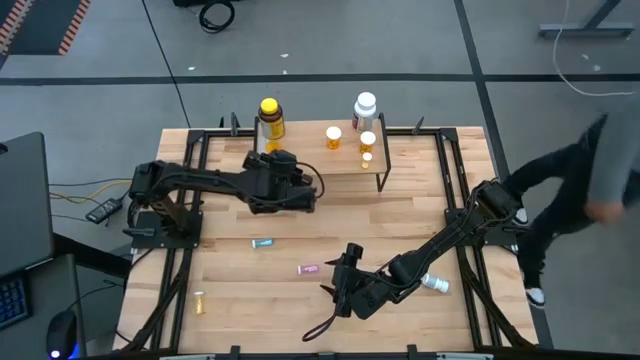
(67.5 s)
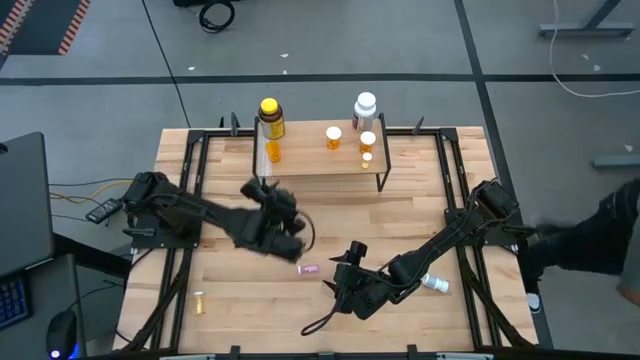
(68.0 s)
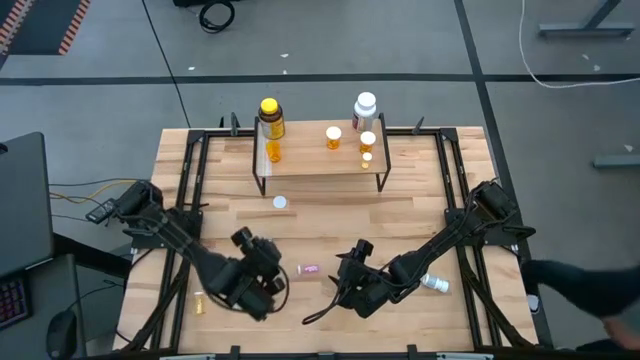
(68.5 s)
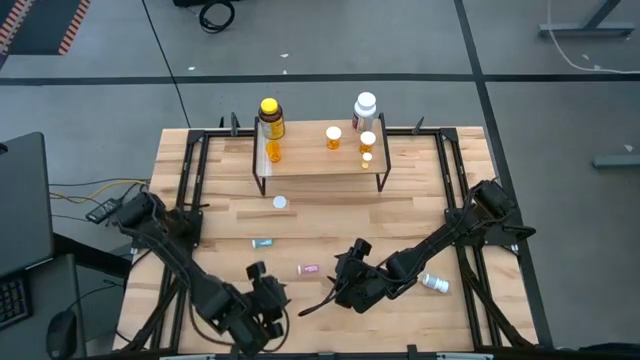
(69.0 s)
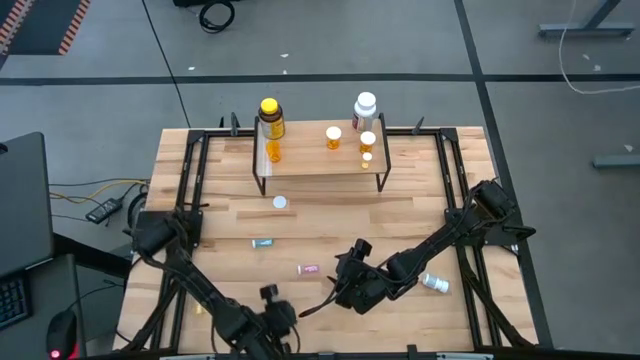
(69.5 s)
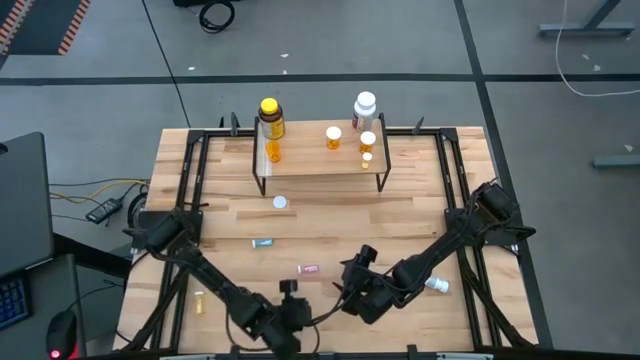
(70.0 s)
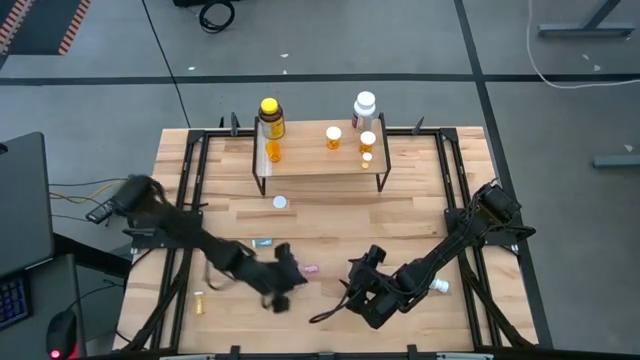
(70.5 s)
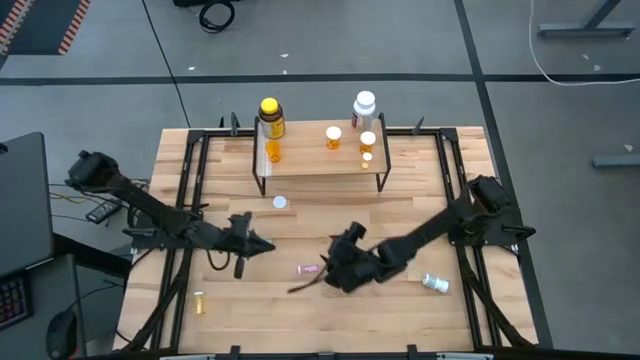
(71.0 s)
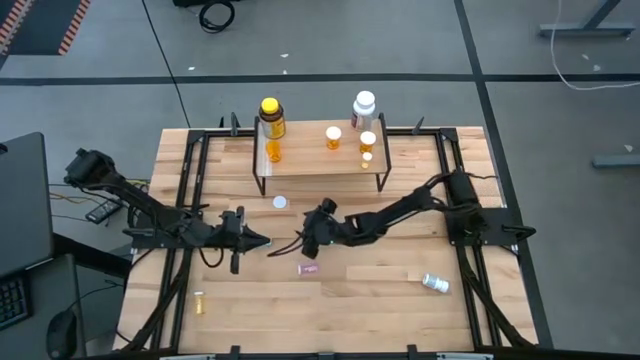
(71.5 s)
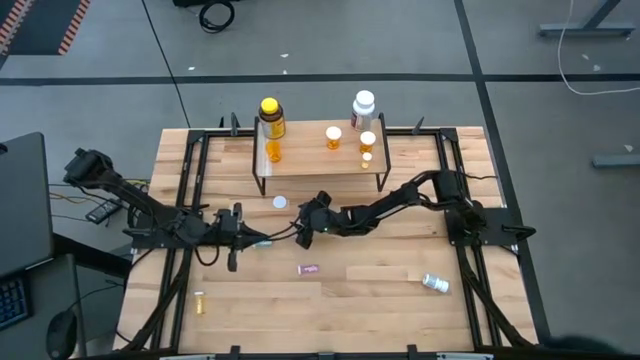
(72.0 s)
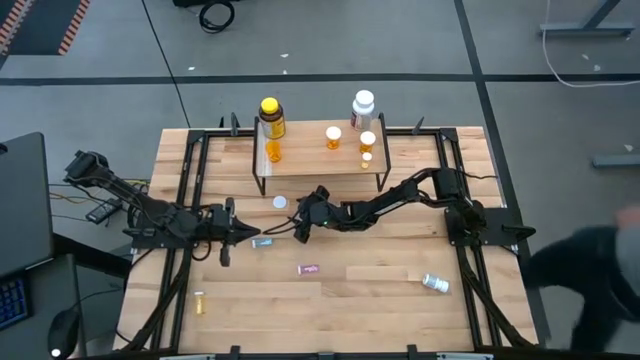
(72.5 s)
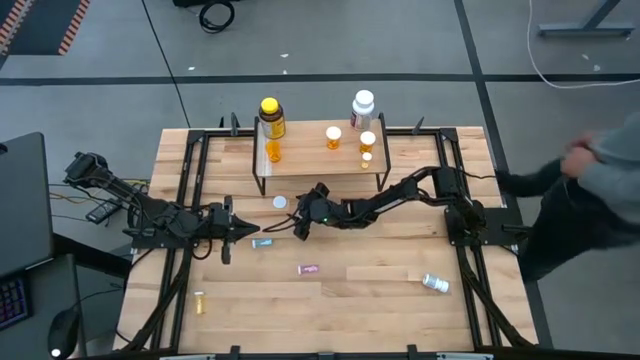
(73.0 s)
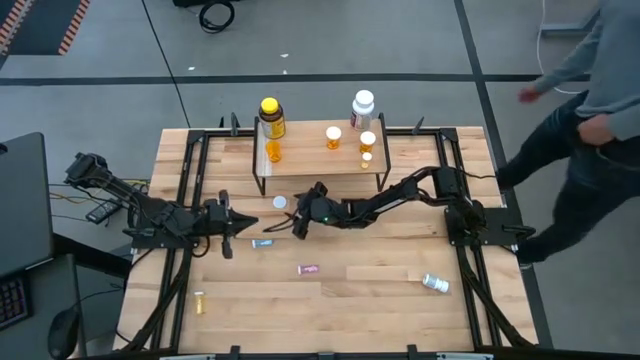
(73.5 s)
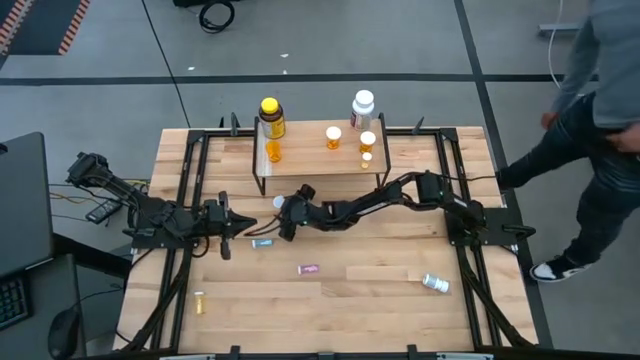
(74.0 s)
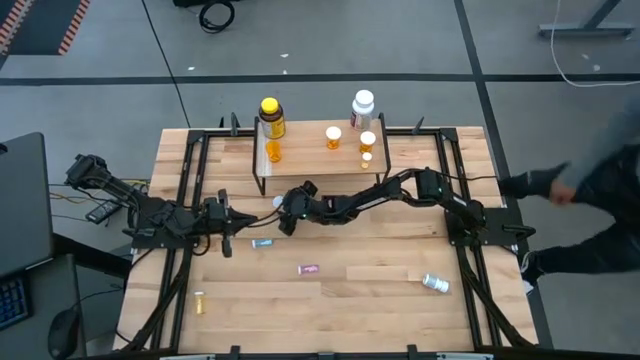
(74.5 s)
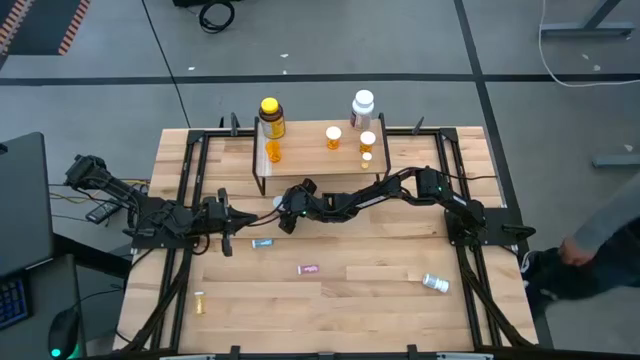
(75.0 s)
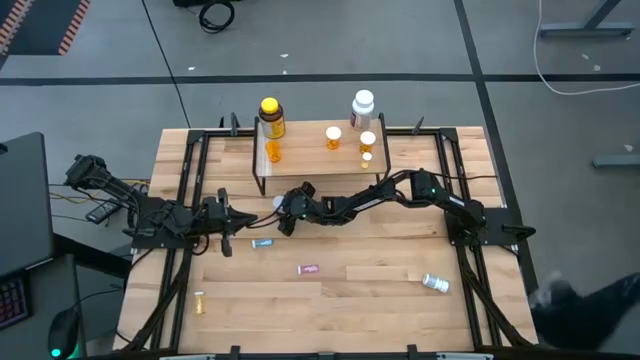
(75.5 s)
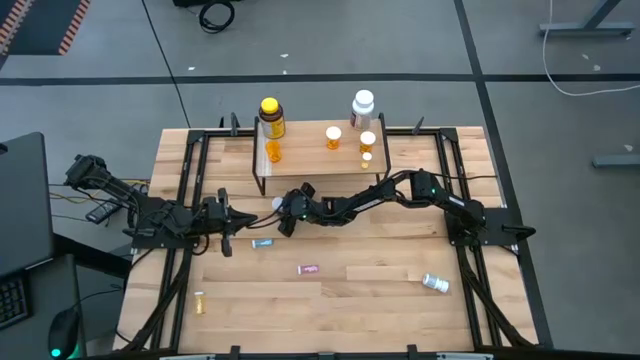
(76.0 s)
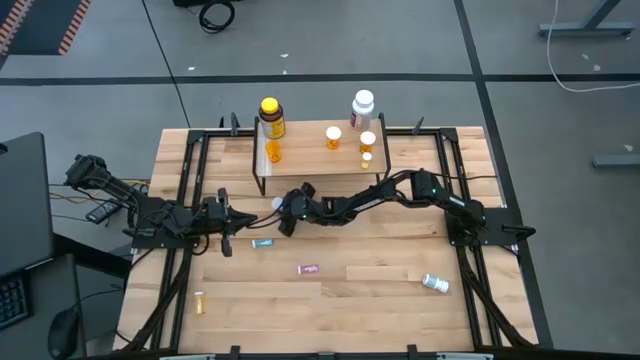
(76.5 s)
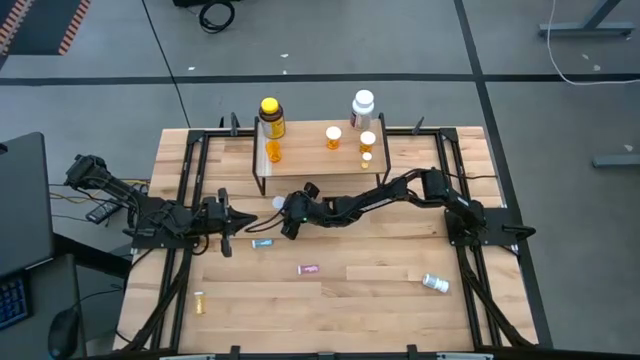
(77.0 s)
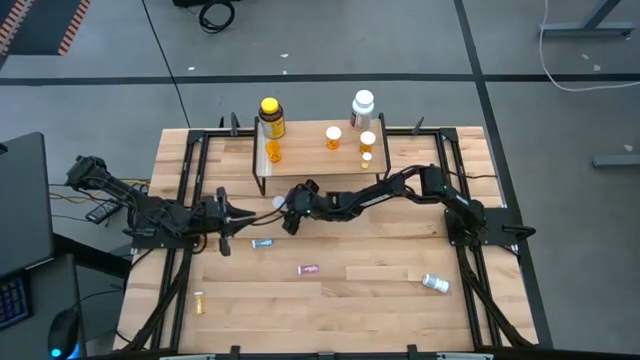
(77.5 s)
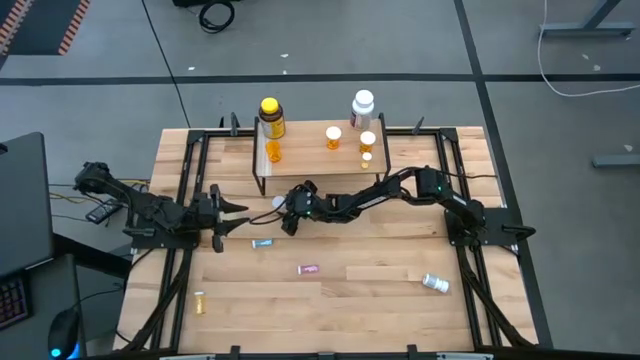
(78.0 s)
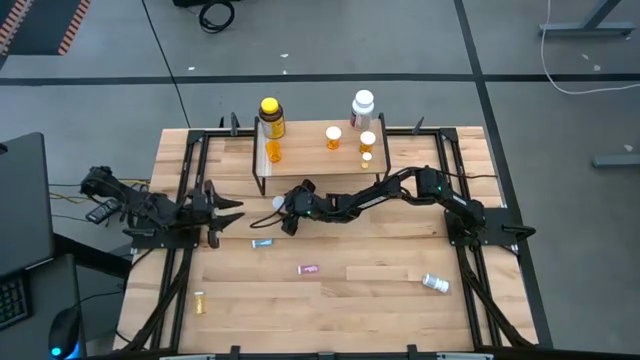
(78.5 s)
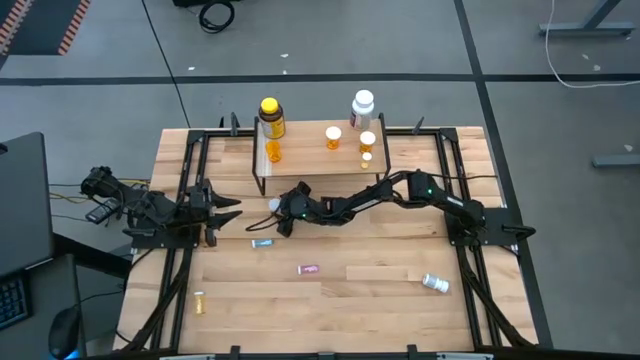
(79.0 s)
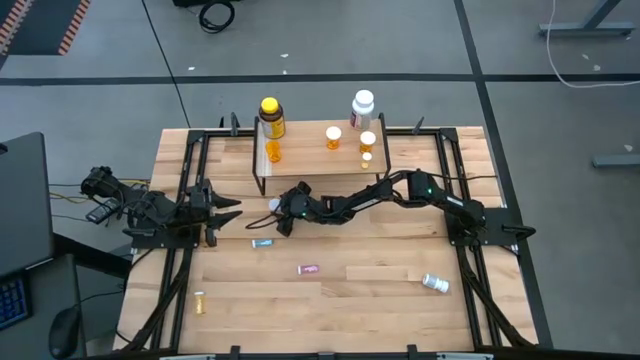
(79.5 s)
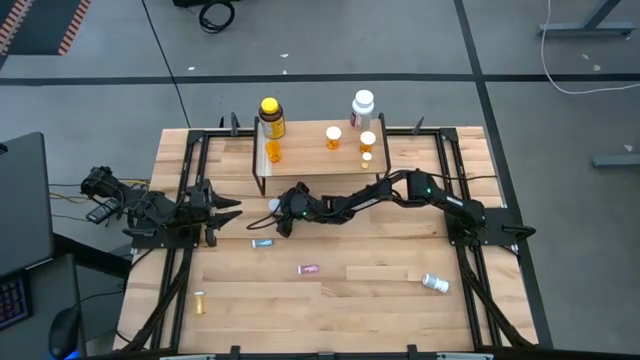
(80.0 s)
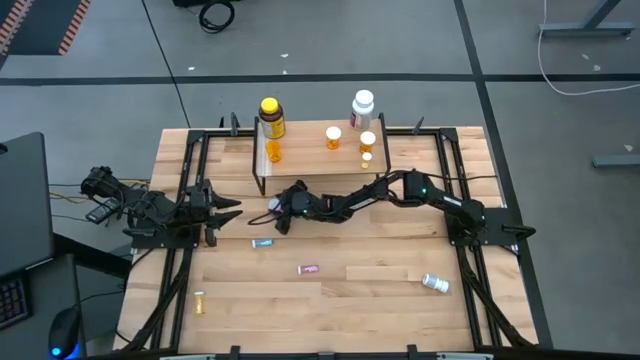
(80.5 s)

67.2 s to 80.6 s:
Task: Pick and place medicine bottles onto shelf by color
Put the lid into the large orange pill bottle on the shelf

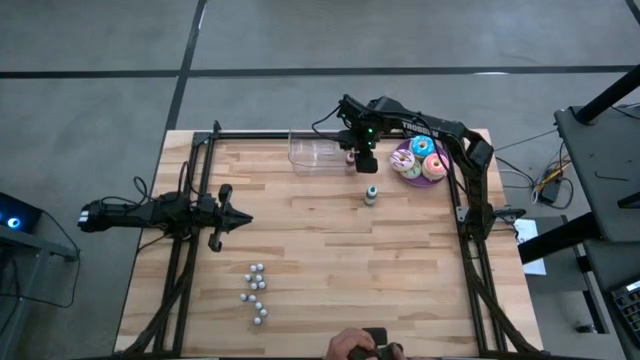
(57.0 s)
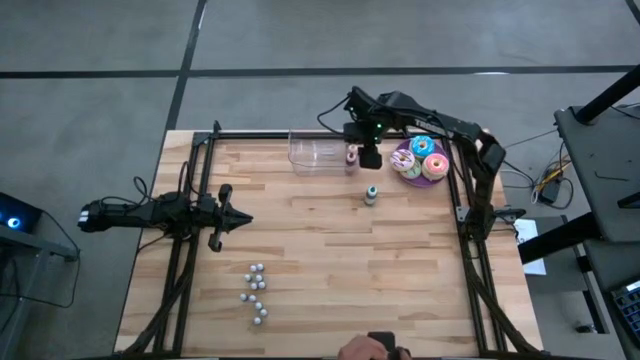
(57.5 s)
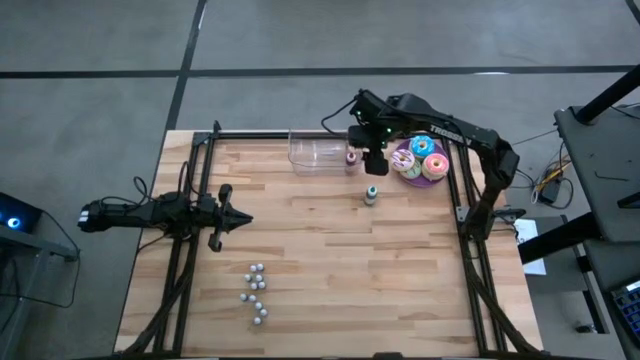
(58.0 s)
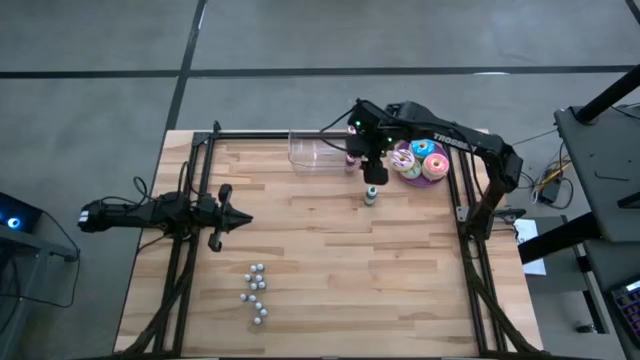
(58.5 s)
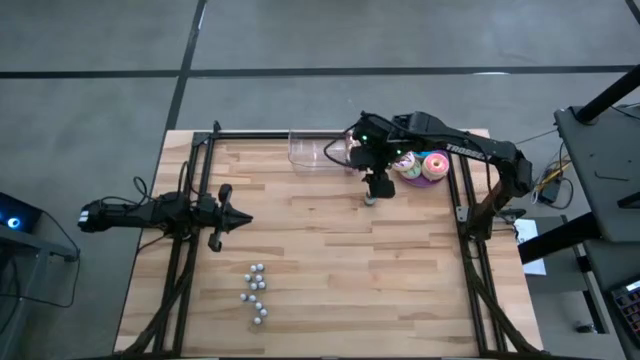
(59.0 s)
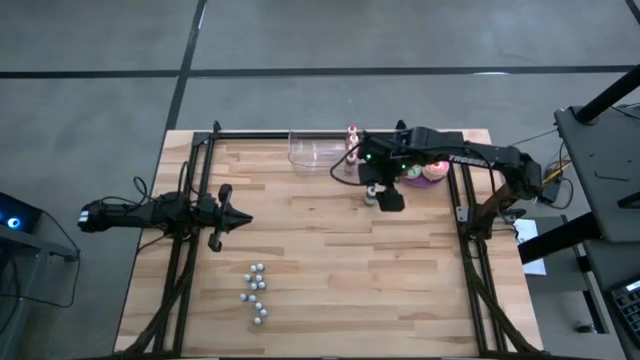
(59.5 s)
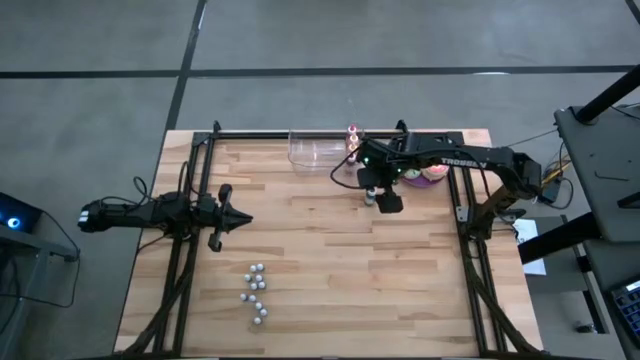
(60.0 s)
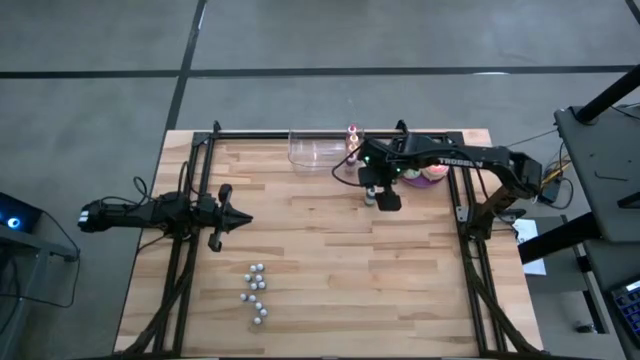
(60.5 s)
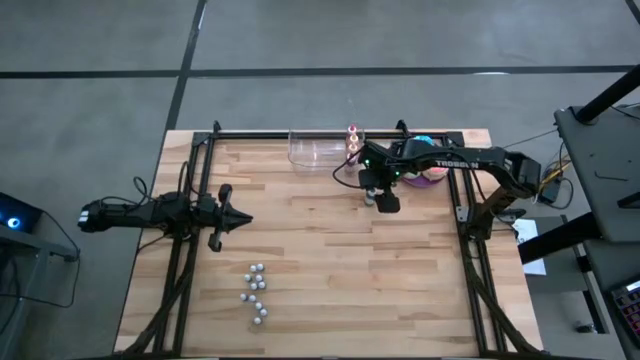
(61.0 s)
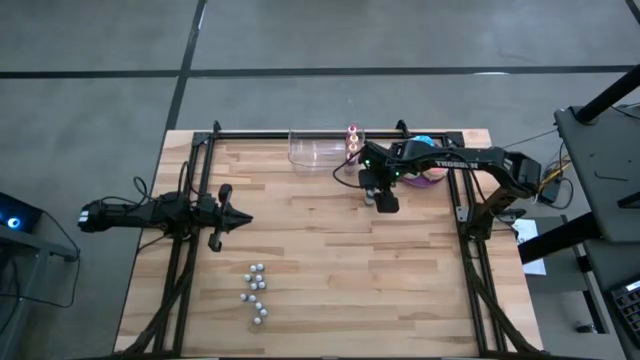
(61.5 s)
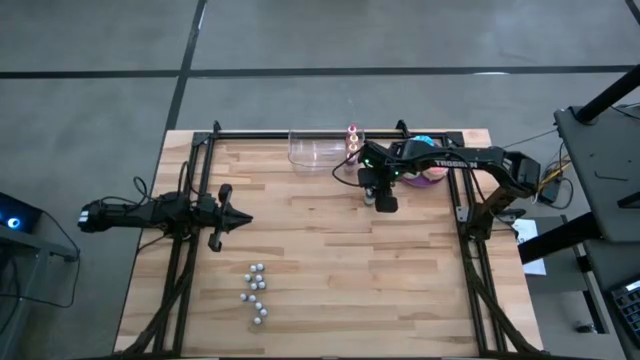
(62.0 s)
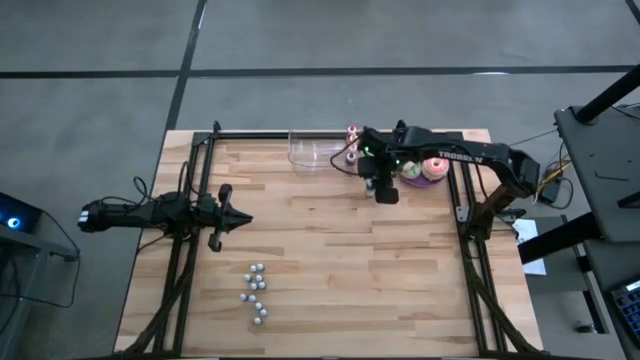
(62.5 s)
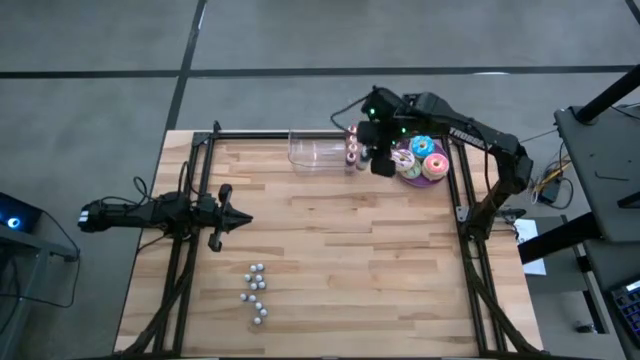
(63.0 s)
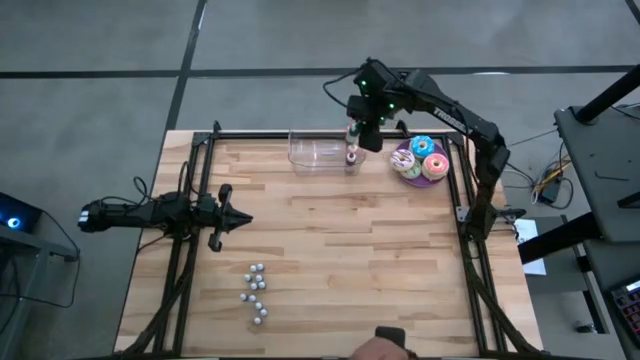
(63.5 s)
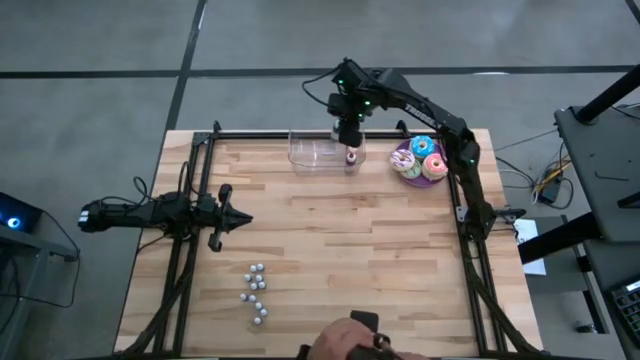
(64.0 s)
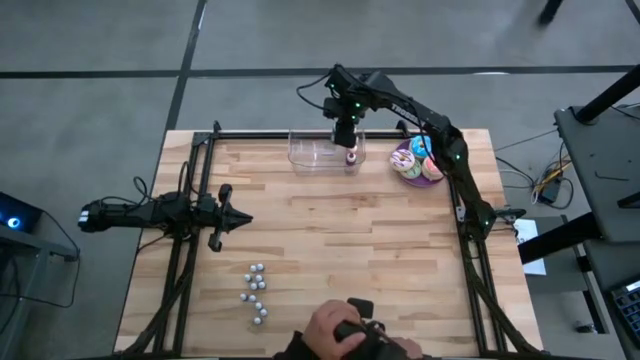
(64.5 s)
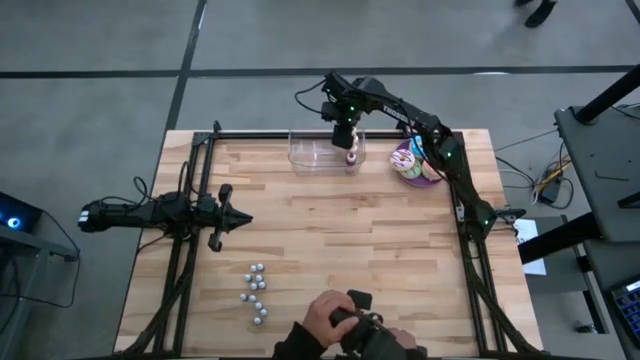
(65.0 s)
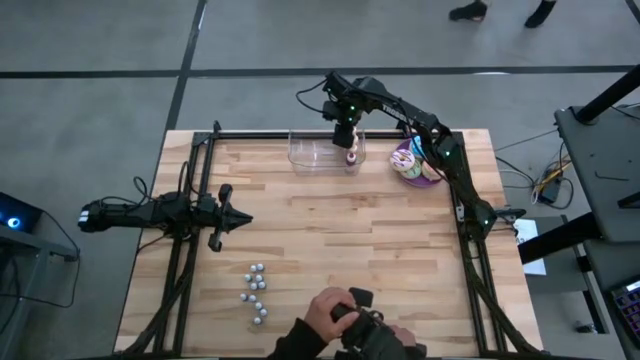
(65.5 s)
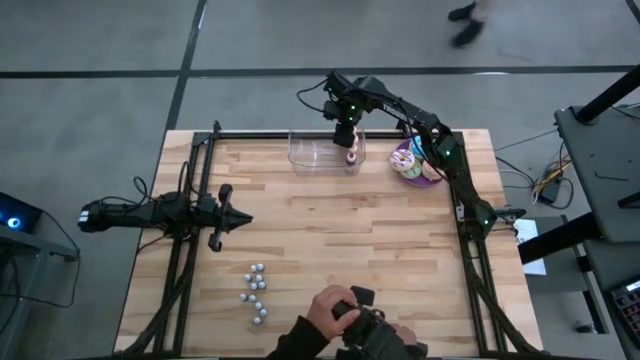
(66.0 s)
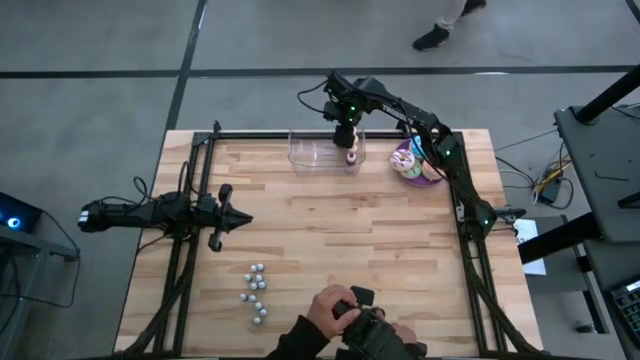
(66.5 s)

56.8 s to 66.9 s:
Task: Pick & Place food coloring
Put the large green food coloring bottle into the transparent bin
